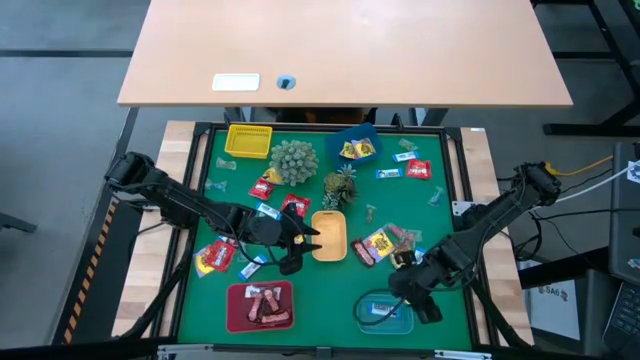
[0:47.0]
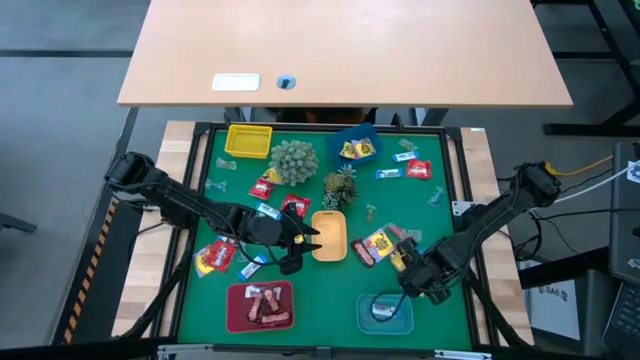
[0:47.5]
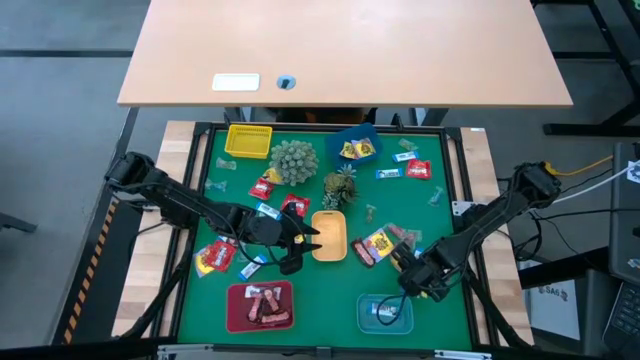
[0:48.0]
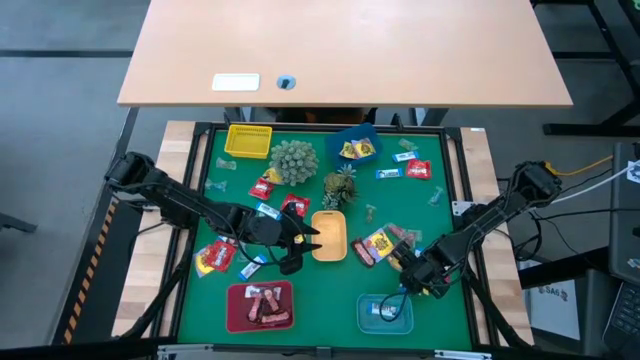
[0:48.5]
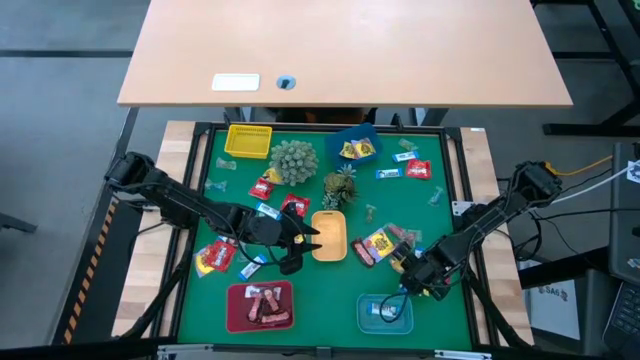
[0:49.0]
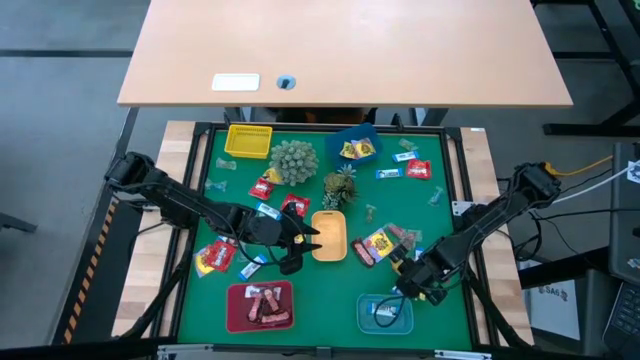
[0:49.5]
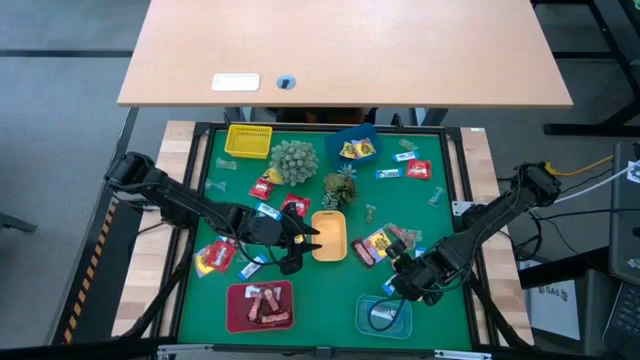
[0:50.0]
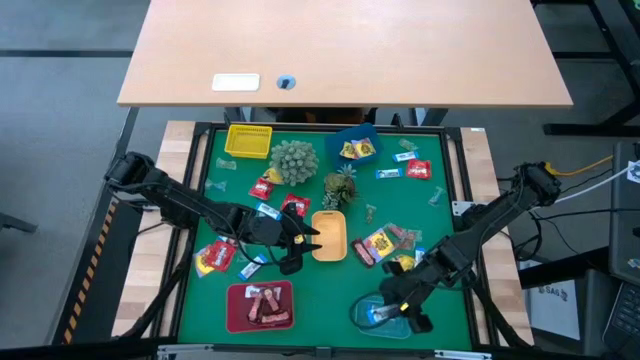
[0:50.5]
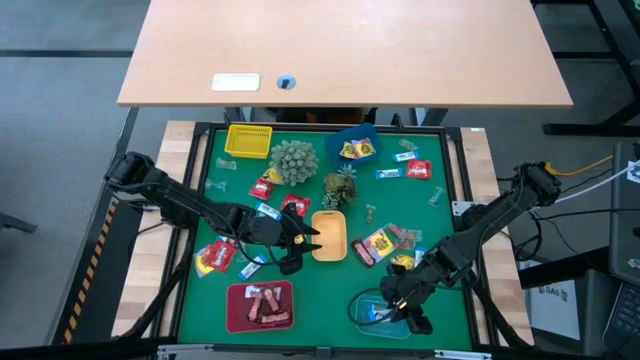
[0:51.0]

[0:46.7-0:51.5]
Task: Sort candy
Put the blue chocolate bar into the light blue bin

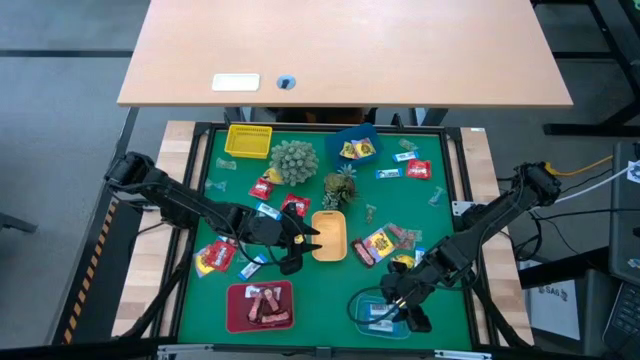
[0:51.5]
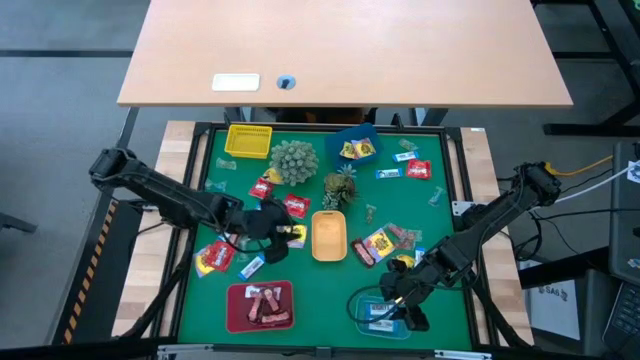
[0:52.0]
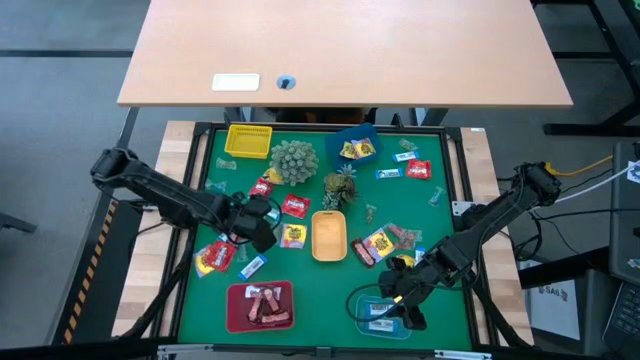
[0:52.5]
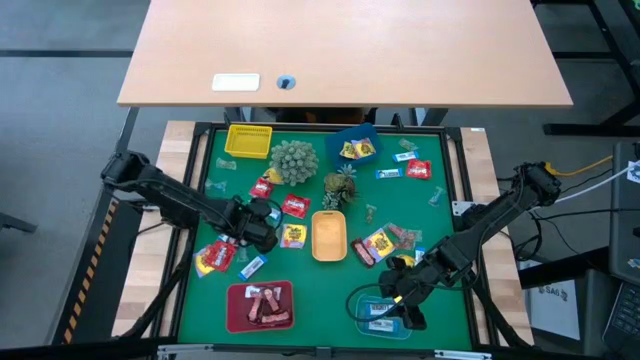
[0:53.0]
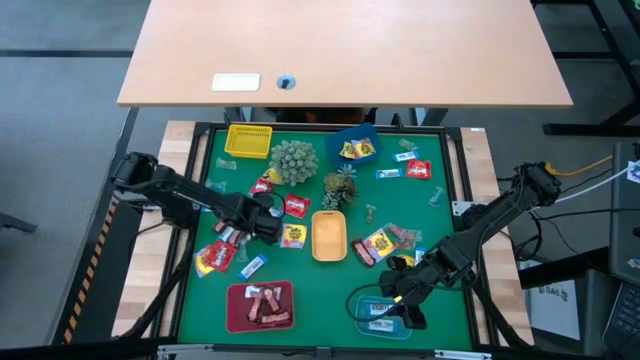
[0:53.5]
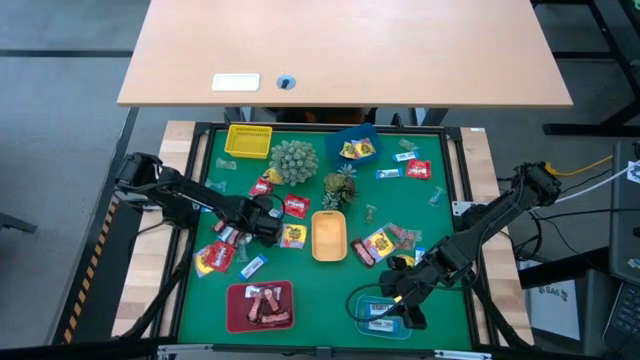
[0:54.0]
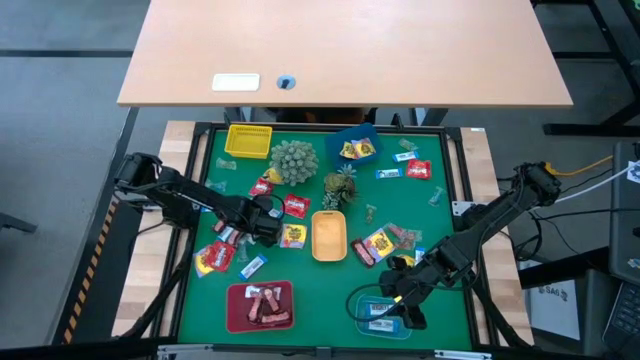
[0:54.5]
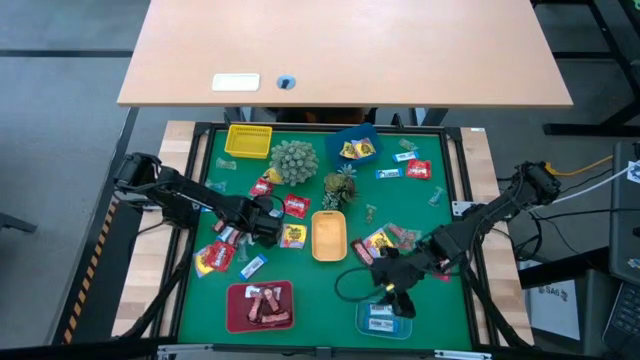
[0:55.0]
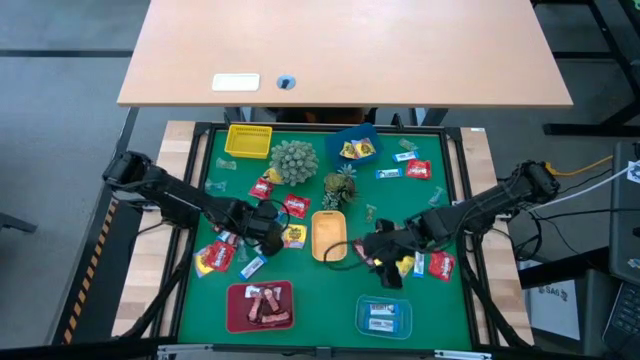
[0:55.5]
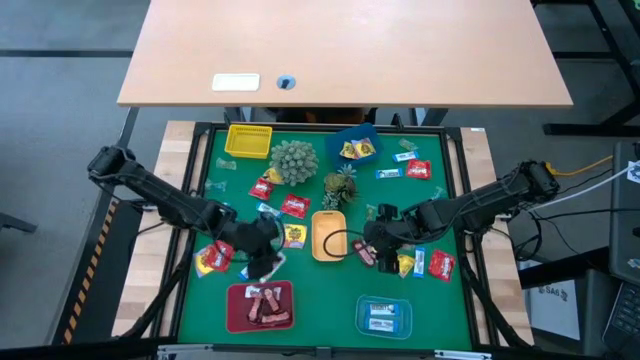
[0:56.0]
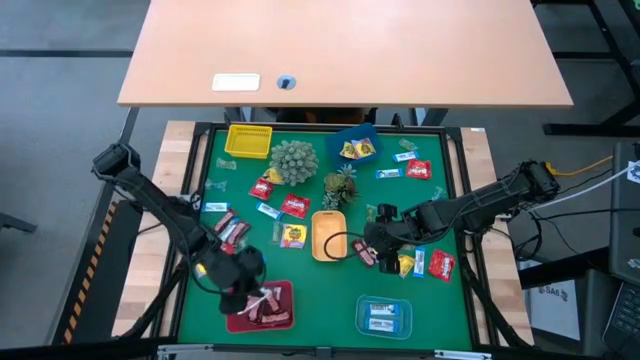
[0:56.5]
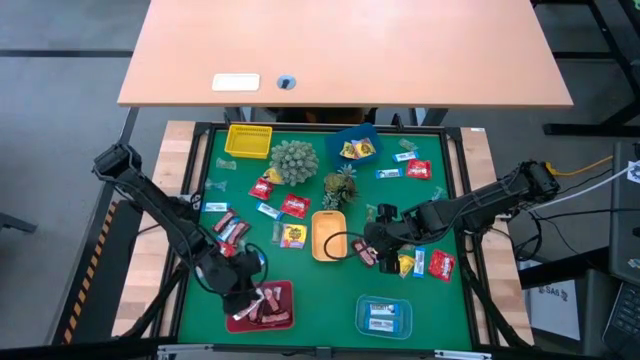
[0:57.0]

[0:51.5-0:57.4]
Put the white chocolate bar into the red bin

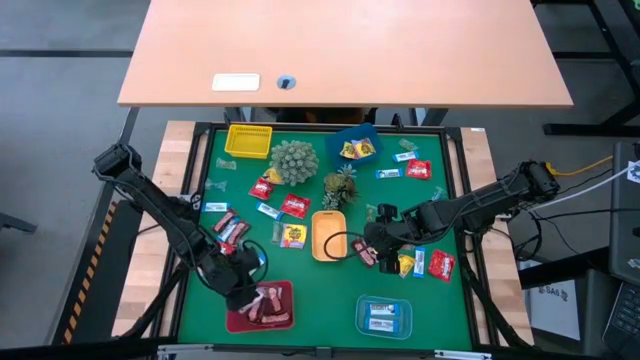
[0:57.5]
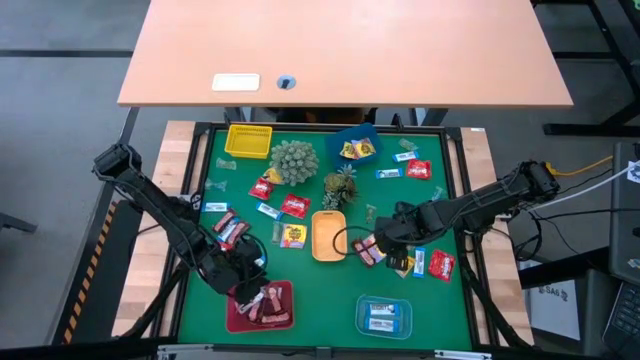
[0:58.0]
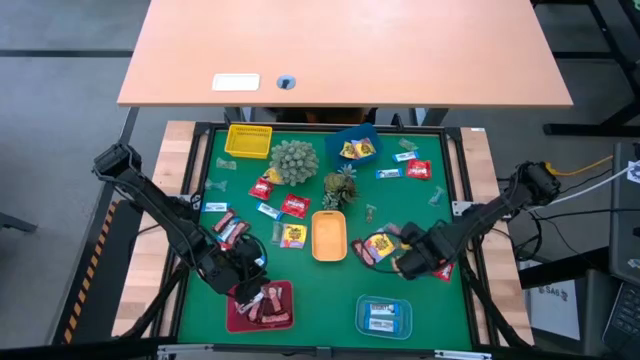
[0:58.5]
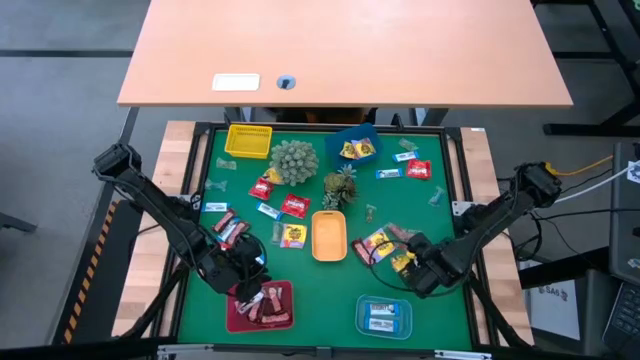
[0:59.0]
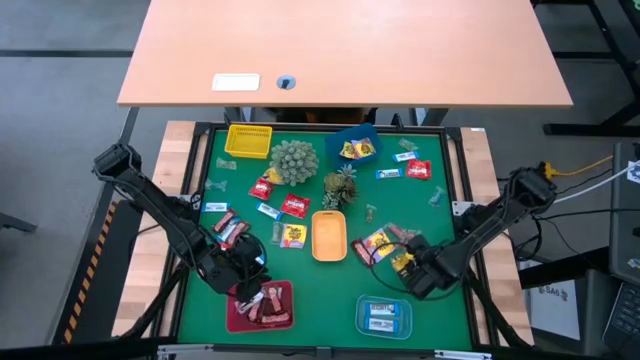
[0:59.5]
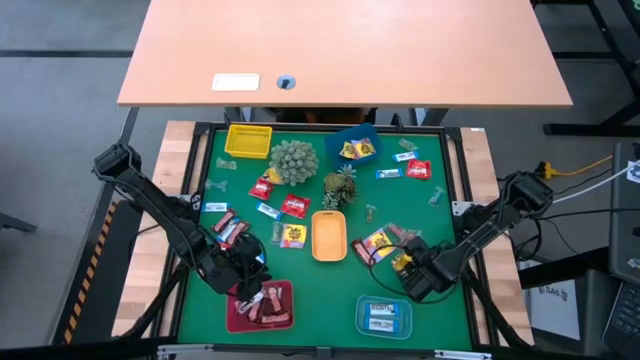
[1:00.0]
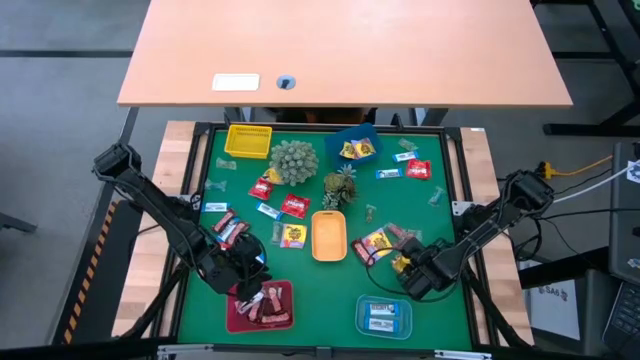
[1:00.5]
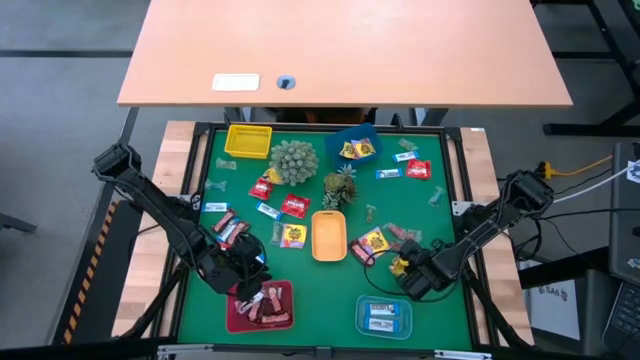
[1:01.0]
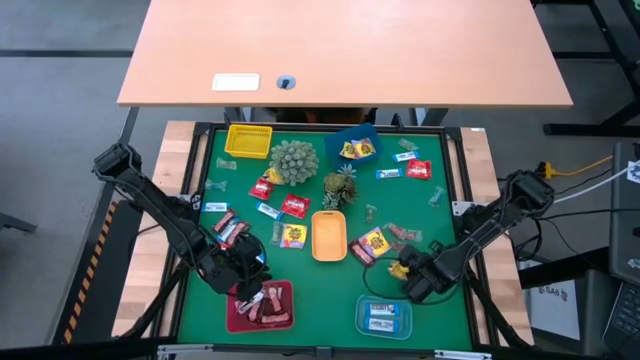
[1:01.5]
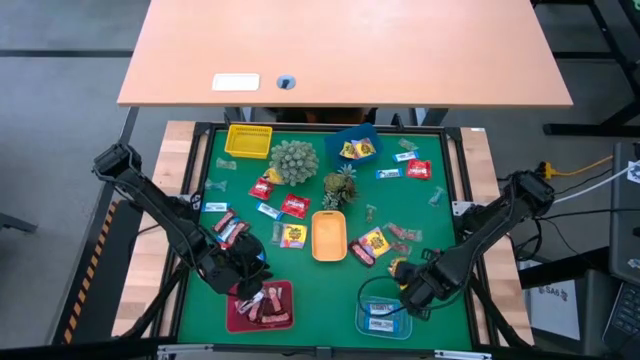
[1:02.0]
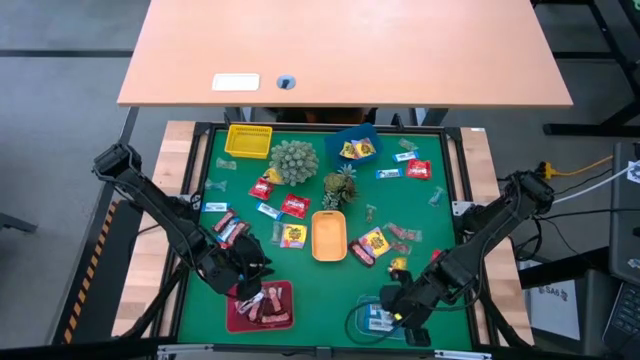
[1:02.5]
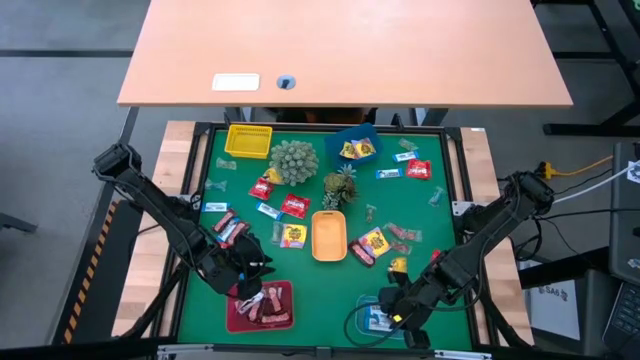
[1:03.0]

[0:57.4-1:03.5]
Put the blue chocolate bar into the light blue bin

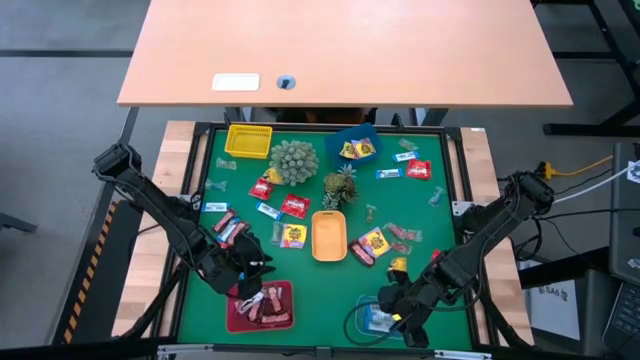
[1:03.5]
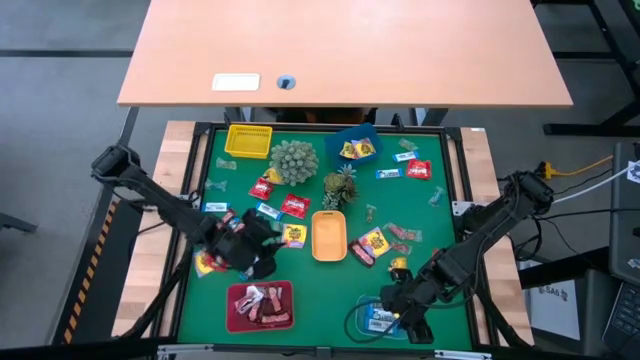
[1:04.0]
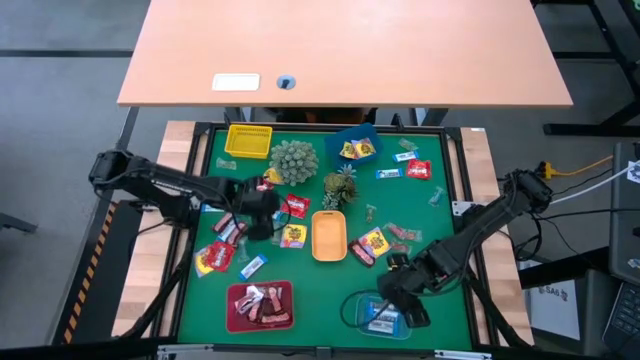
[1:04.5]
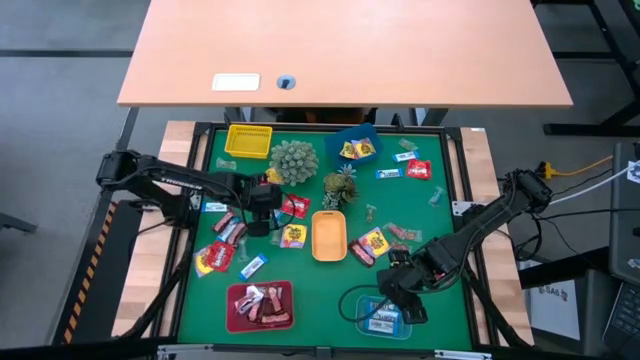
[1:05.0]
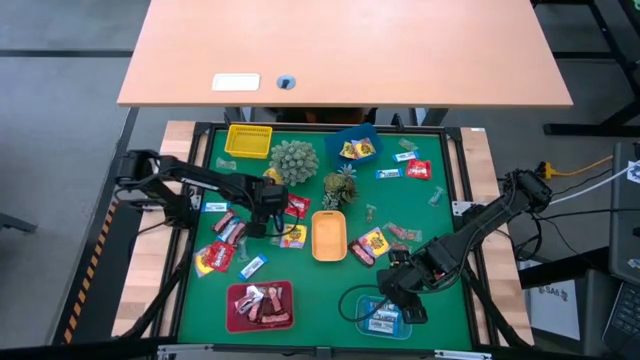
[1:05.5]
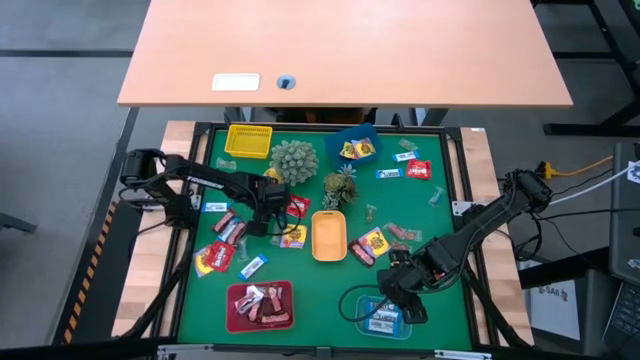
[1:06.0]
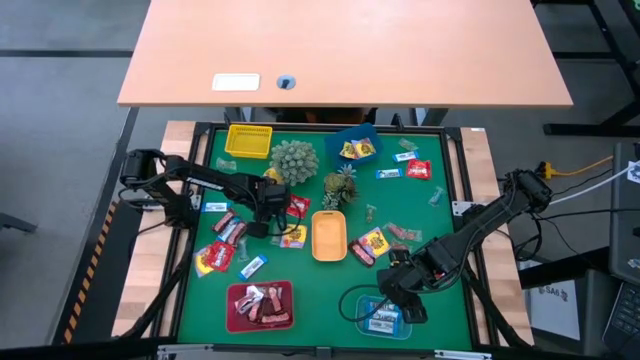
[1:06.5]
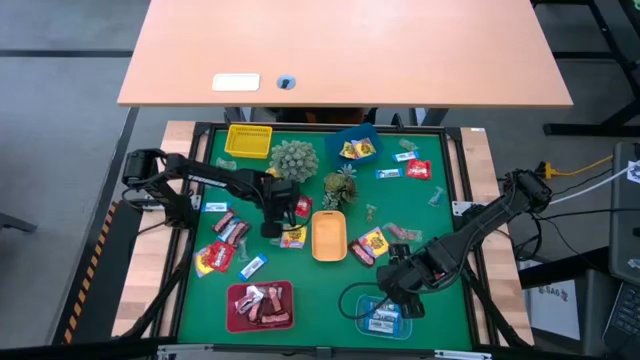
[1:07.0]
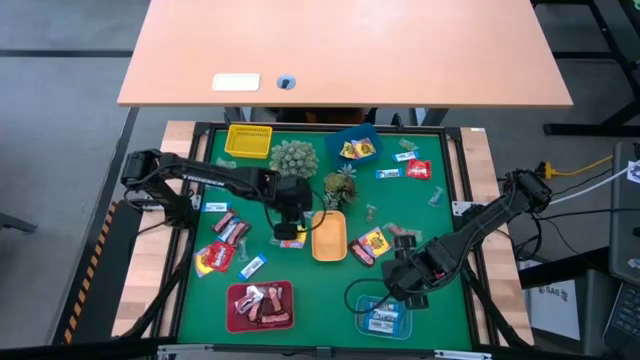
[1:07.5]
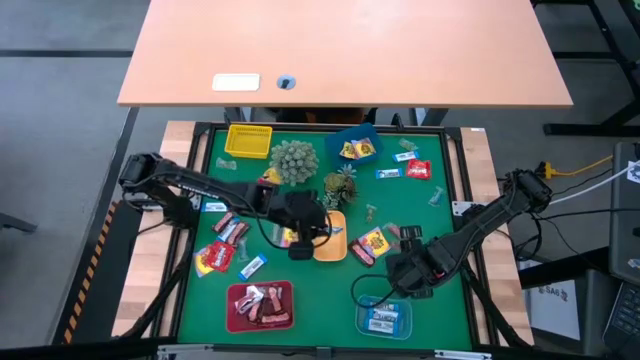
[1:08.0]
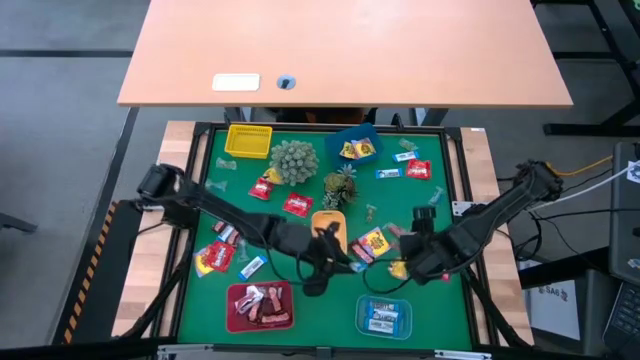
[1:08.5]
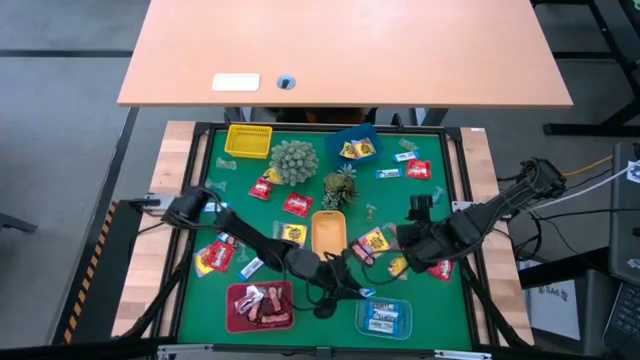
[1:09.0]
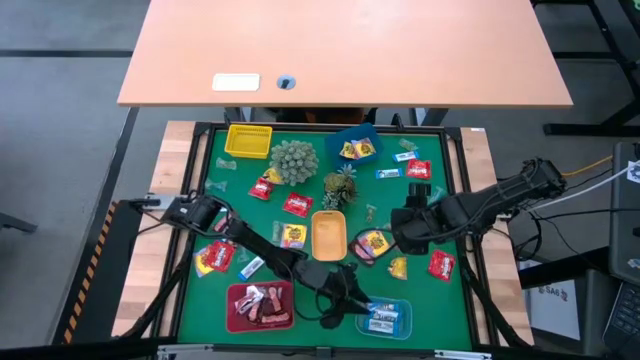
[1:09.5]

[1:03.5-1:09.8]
Put the blue chocolate bar into the light blue bin
